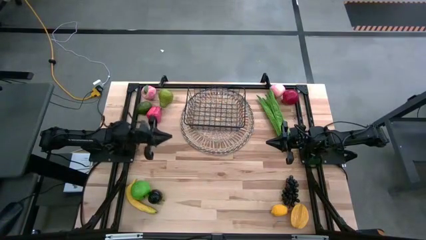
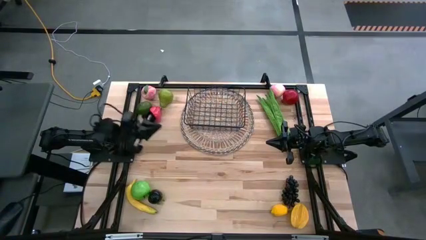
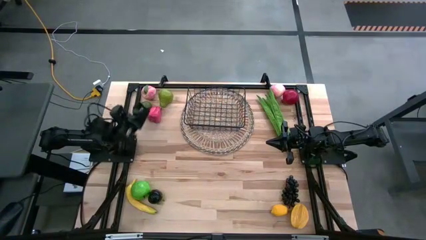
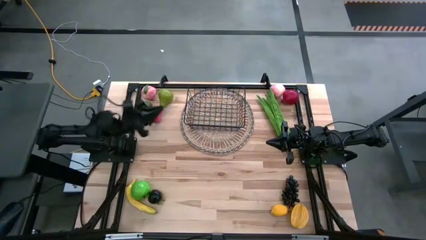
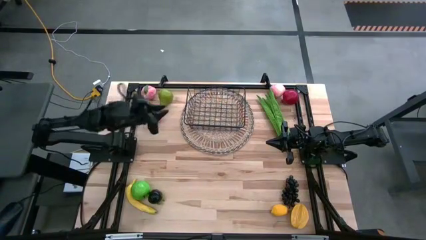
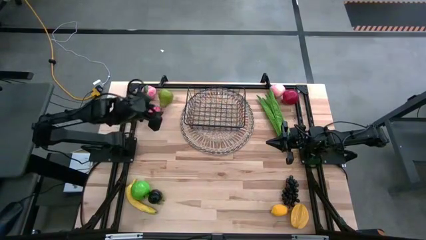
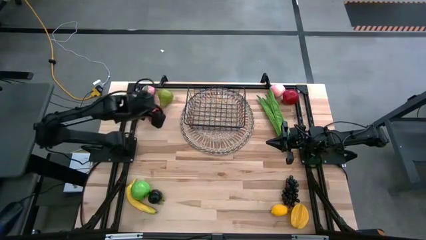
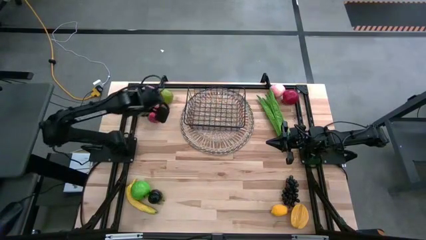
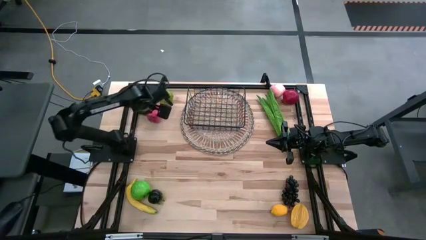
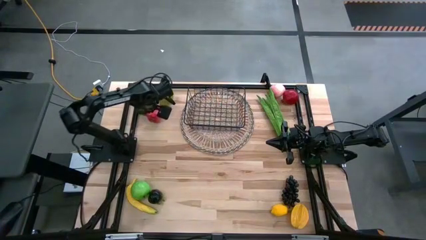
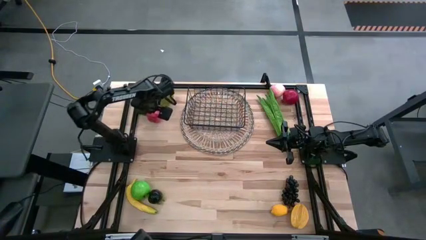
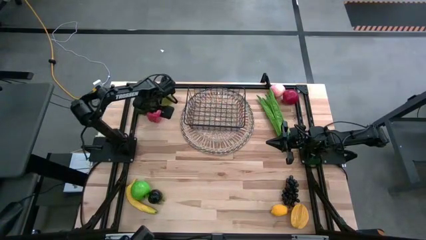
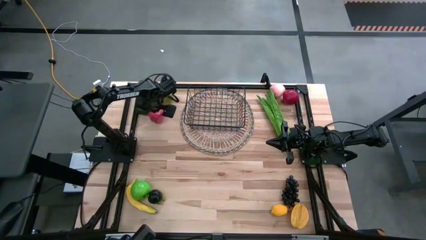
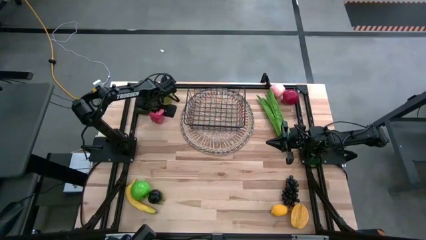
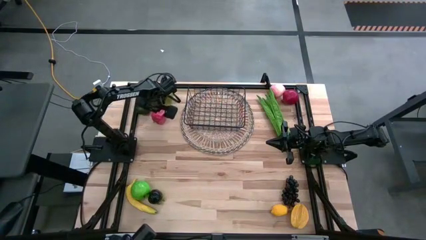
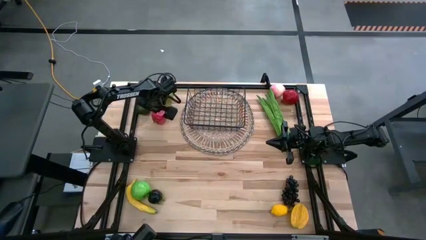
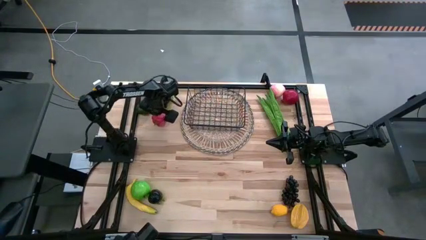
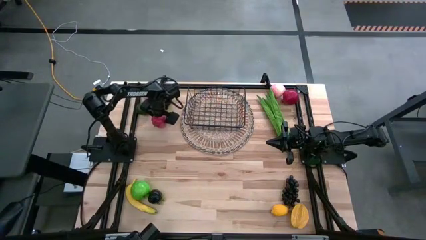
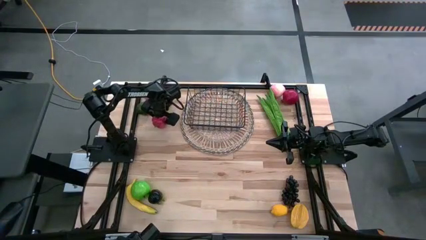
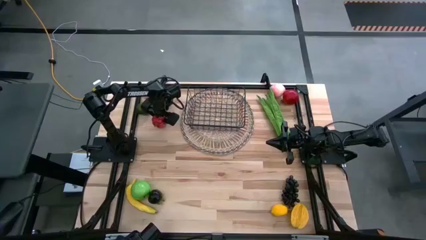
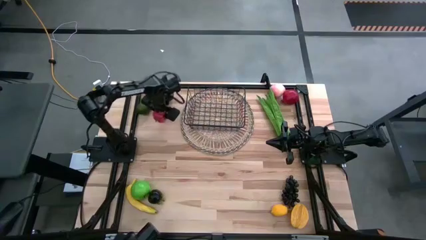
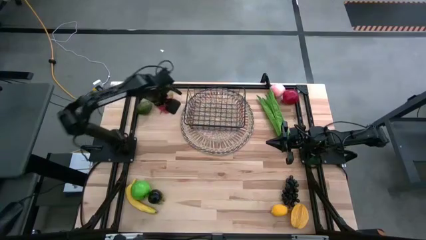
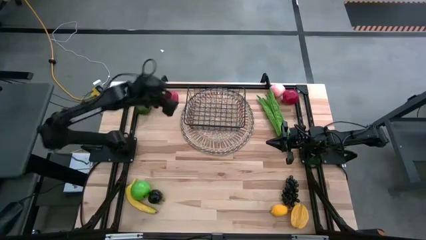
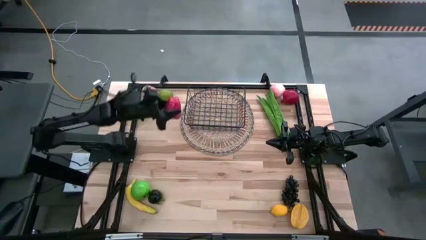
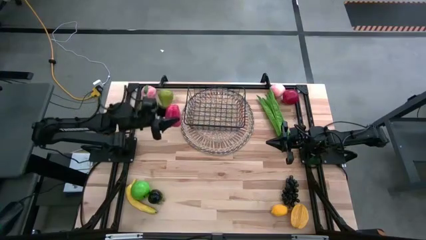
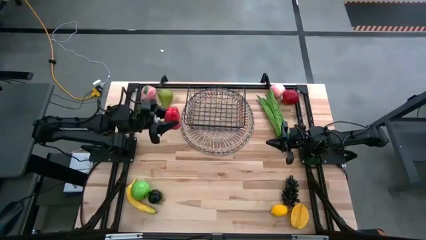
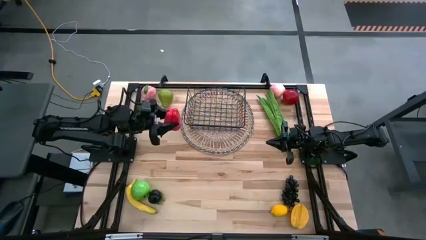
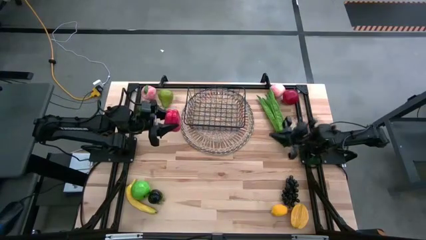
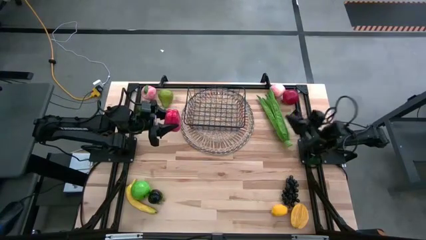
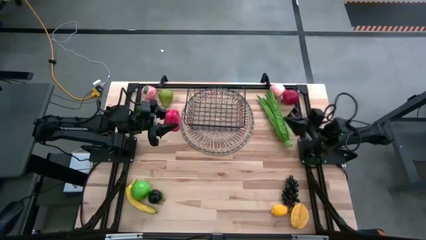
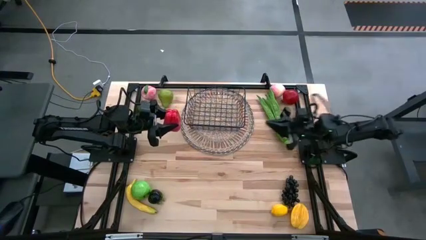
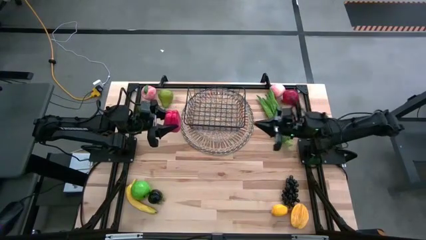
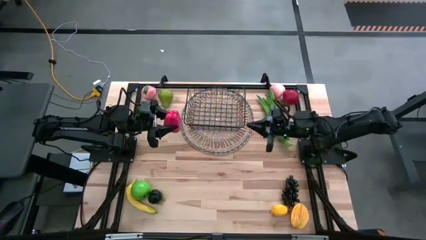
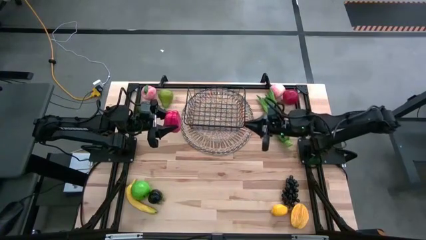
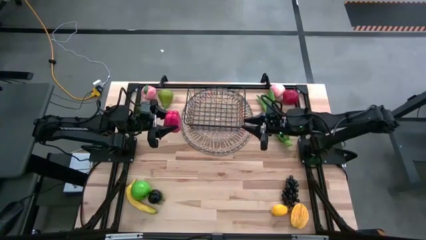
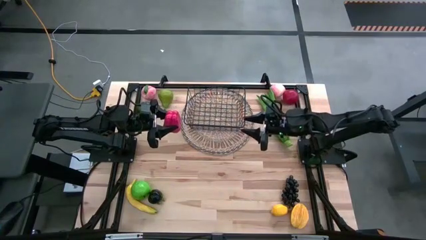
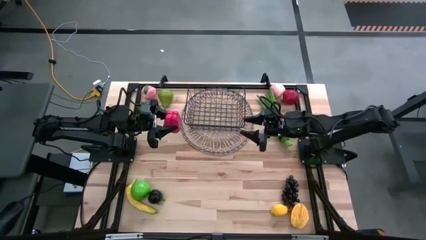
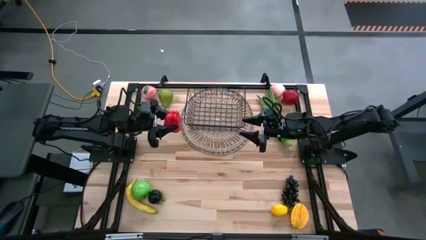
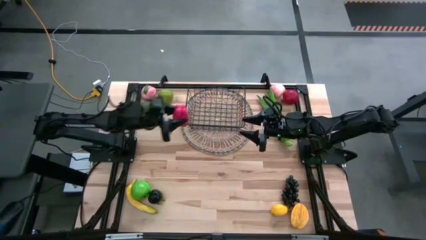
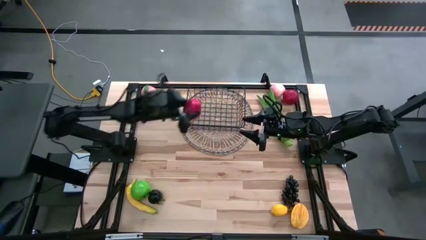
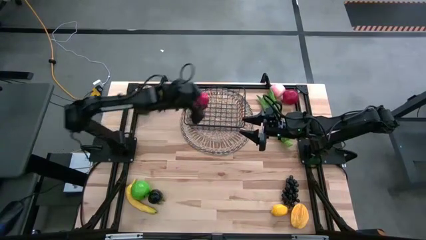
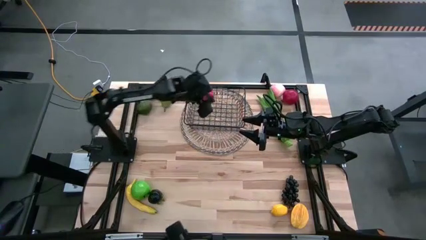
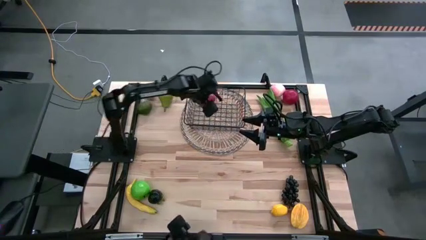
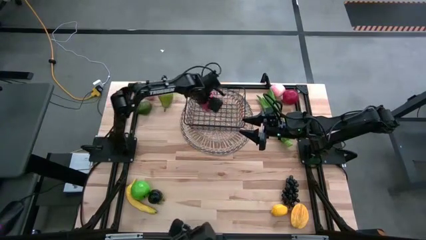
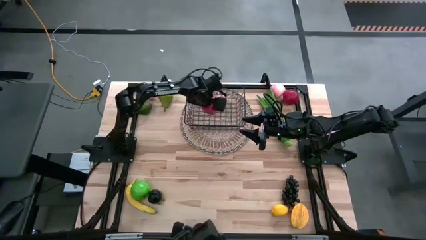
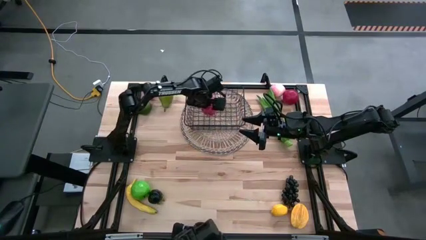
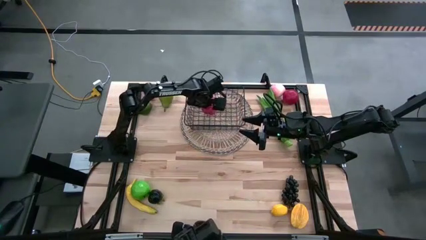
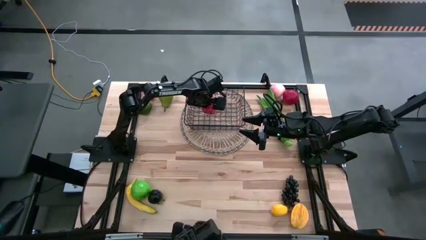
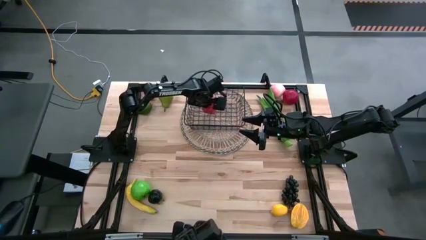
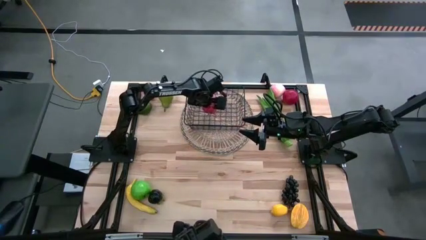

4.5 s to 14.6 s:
Task: Build produce basket
Put the red bell pepper into the black wire basket

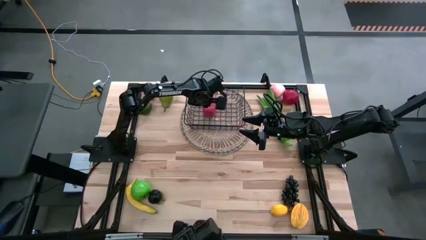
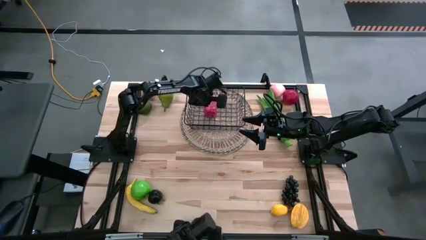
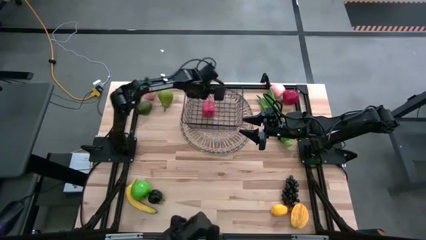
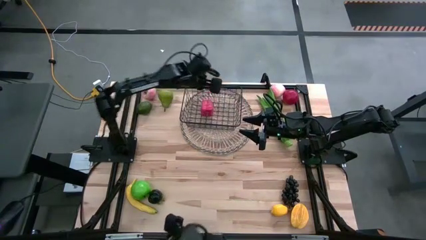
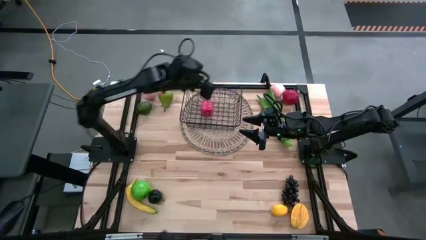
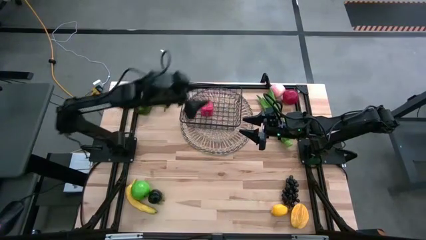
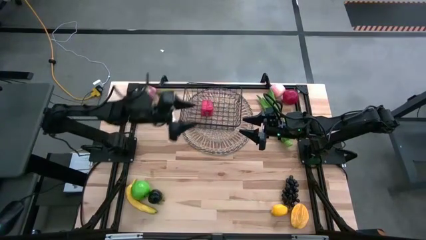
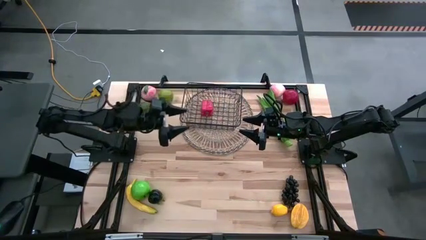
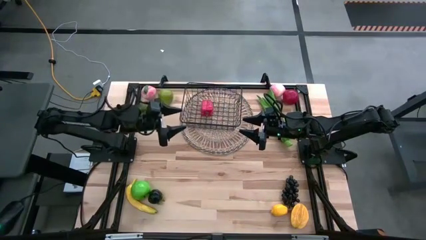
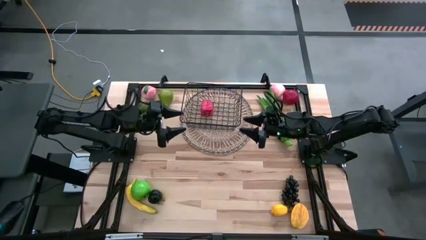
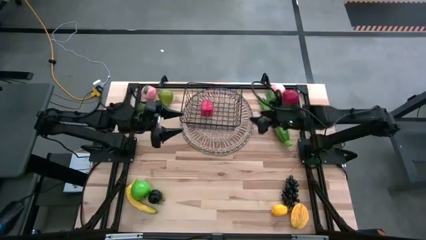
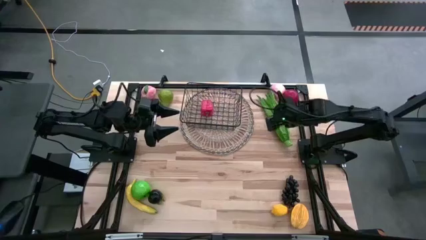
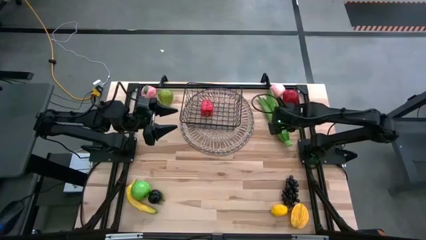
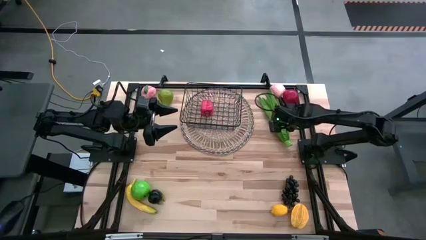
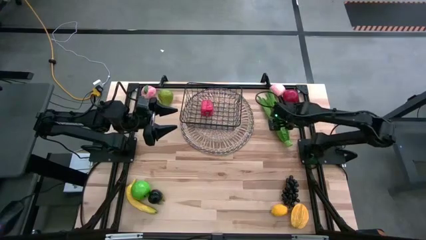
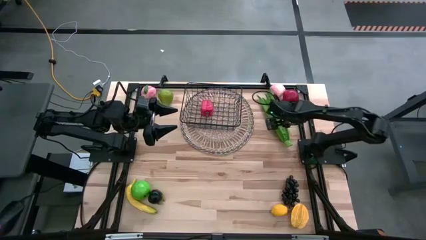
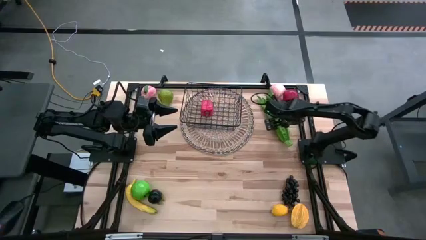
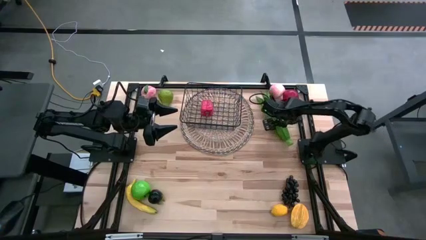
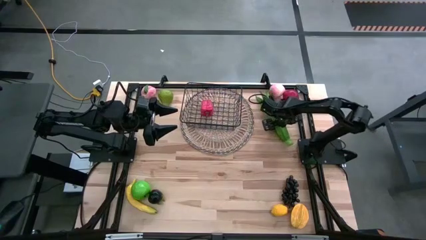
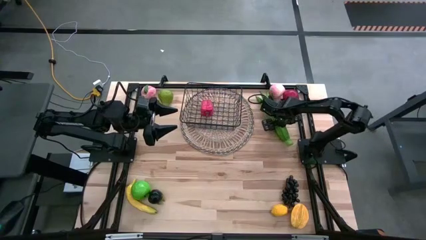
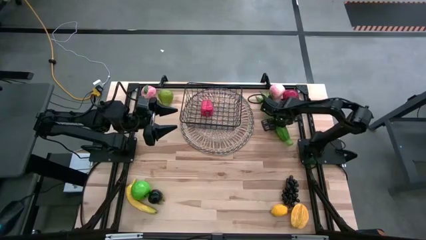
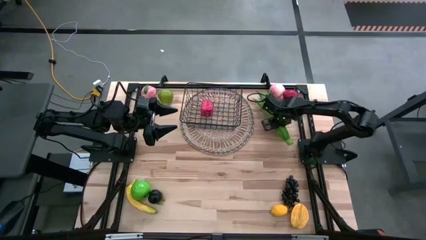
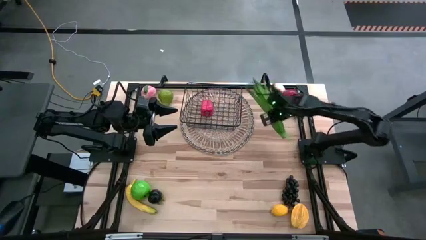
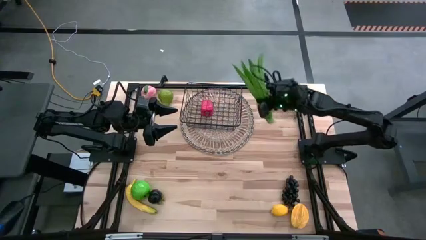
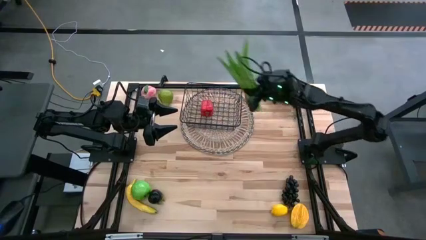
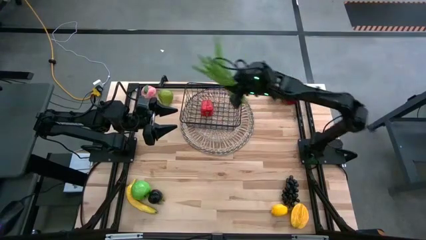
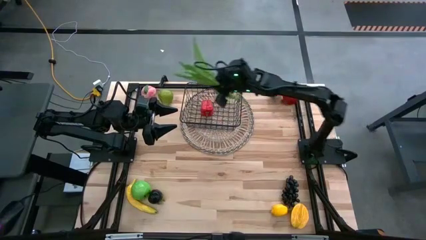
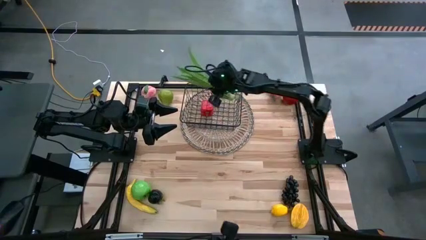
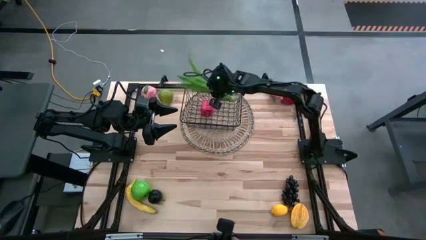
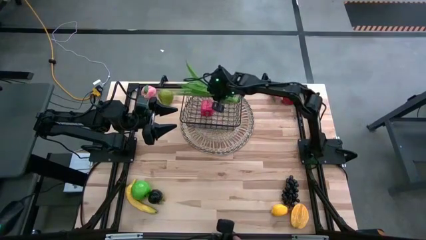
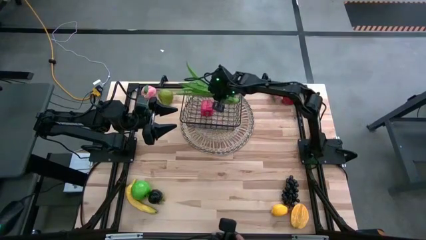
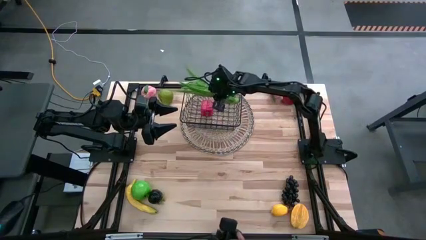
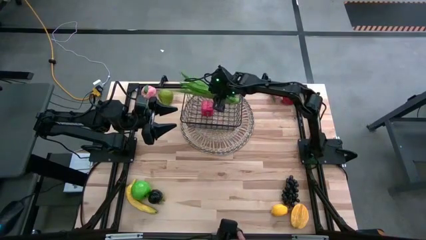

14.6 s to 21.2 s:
Put the leaf lettuce into the black wire basket
